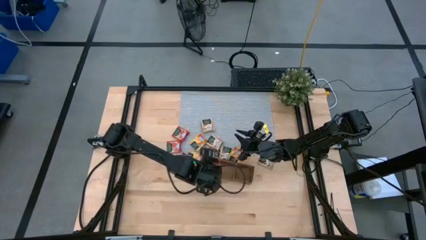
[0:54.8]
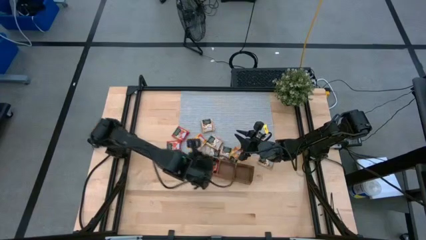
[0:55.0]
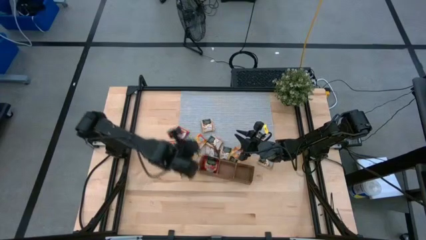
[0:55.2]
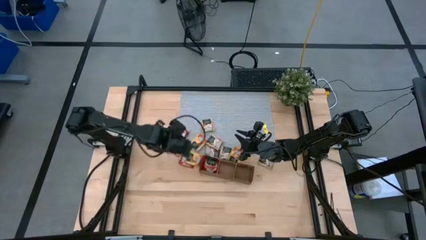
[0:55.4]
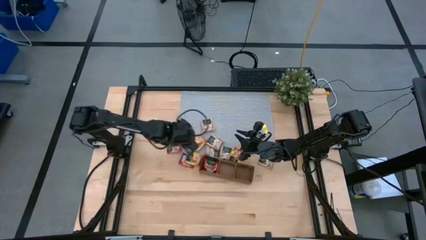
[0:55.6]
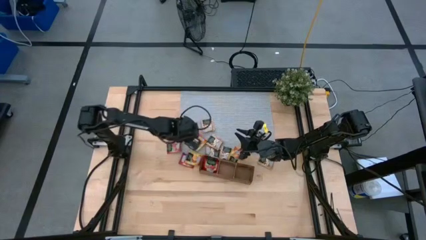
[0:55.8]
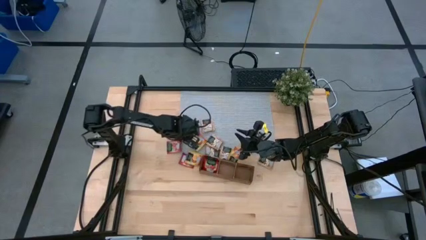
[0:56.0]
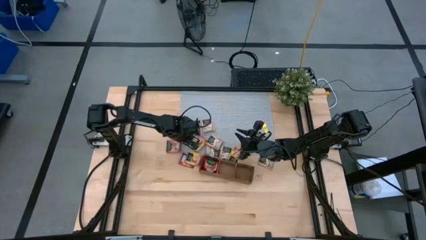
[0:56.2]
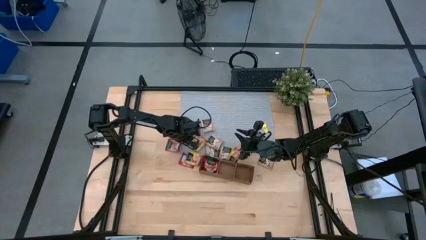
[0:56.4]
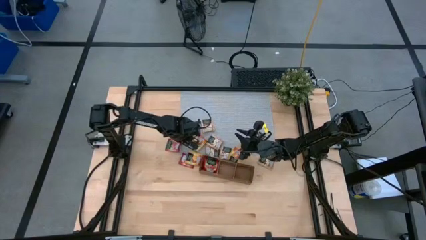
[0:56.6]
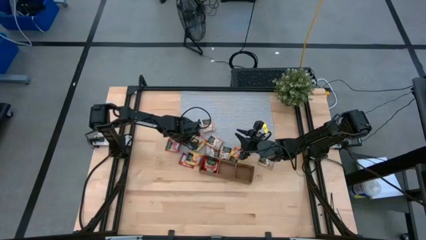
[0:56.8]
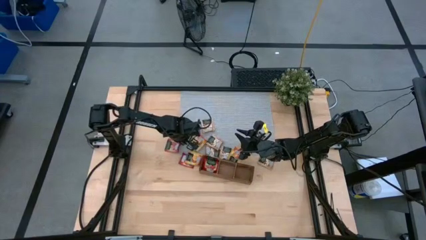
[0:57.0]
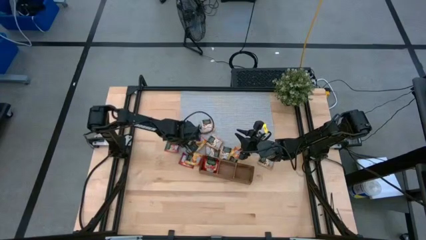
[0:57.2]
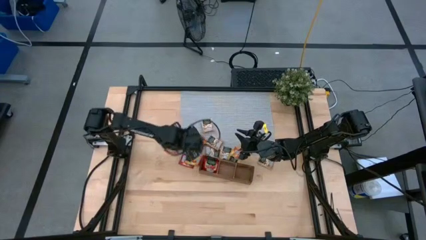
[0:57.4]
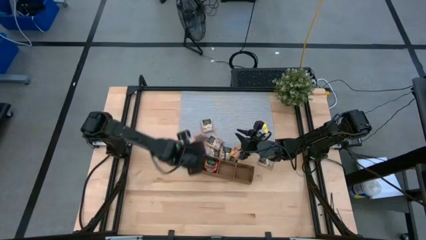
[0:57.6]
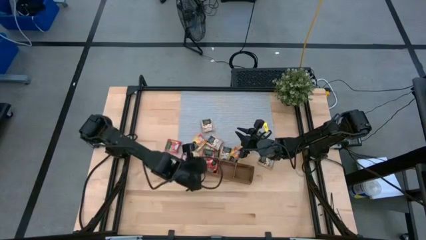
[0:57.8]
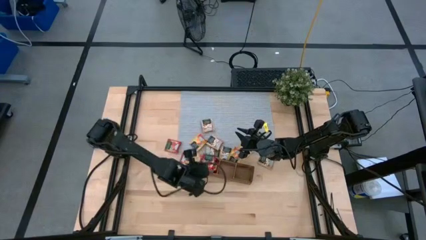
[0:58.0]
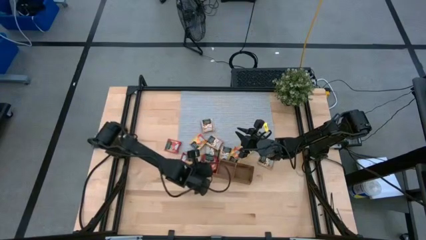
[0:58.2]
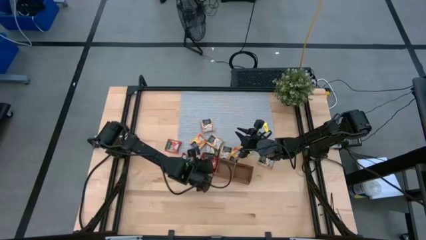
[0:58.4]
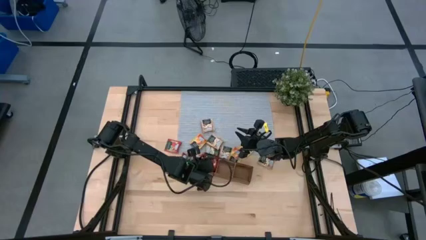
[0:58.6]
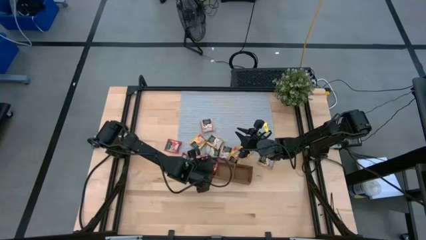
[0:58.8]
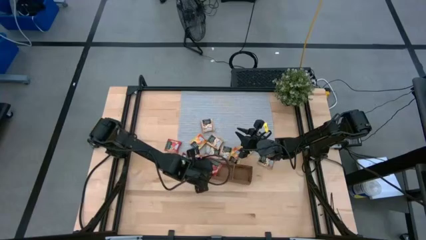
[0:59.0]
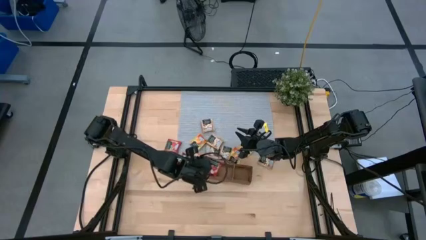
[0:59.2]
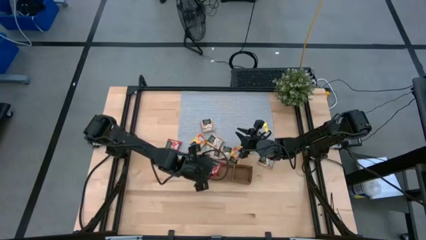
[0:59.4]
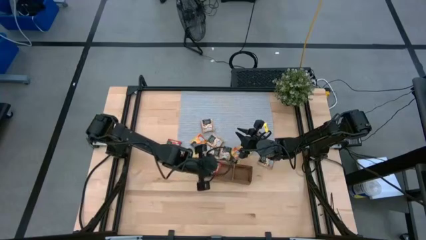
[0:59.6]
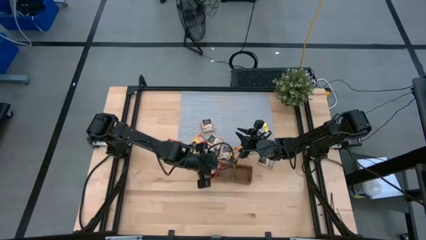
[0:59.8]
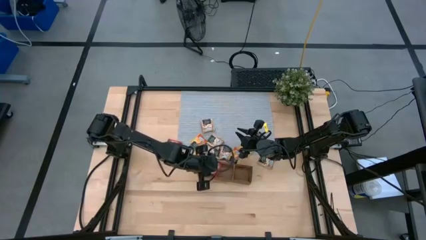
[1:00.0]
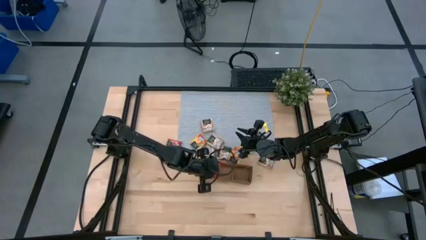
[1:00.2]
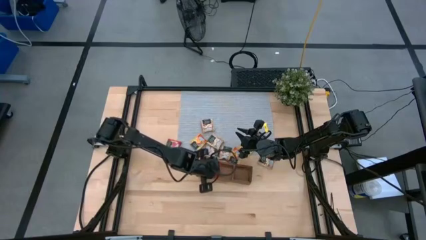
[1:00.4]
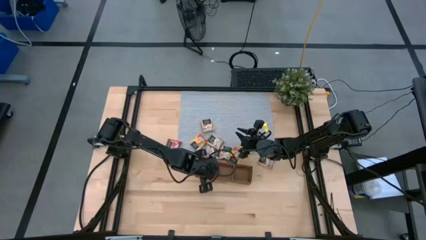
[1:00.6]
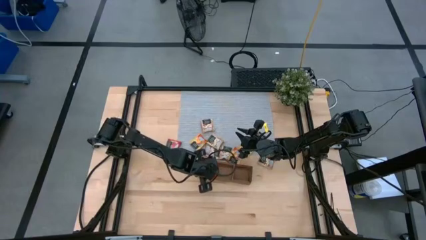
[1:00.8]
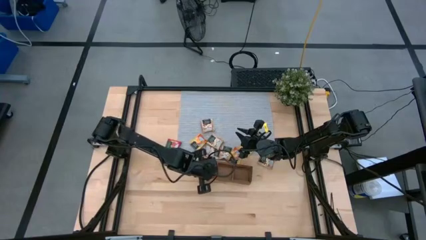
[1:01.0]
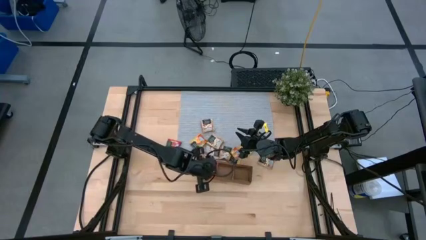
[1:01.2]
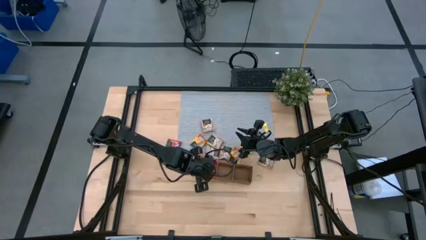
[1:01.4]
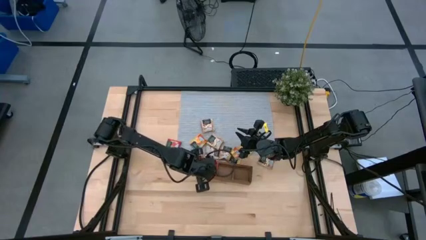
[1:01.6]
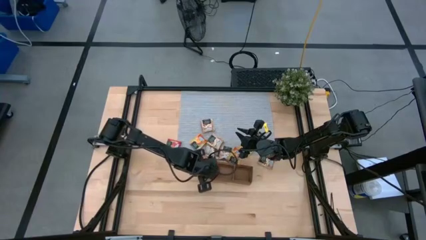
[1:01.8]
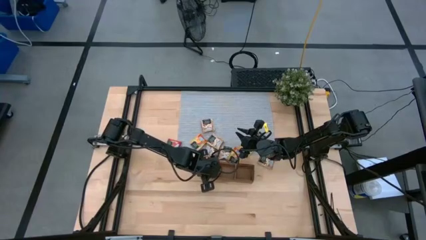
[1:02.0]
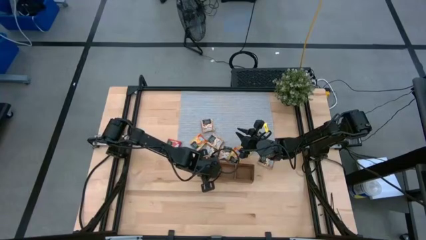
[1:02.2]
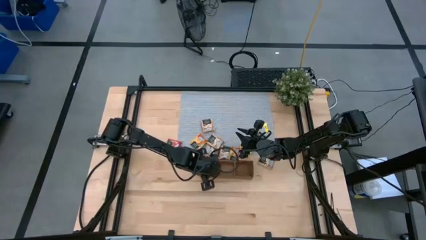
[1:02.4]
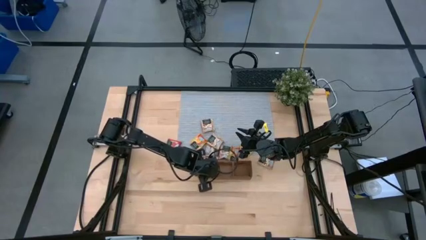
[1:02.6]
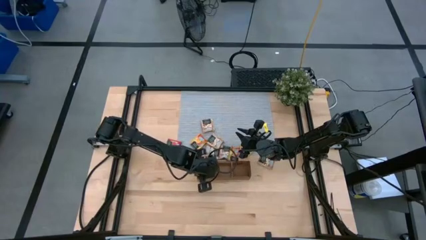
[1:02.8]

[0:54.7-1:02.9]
Task: Pick & Place Tea
Put the red tea bag into the left section of the wooden organizer

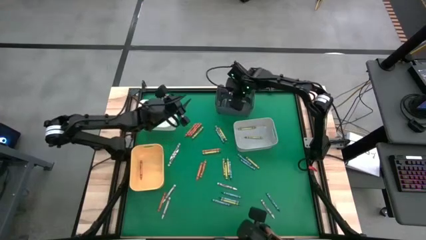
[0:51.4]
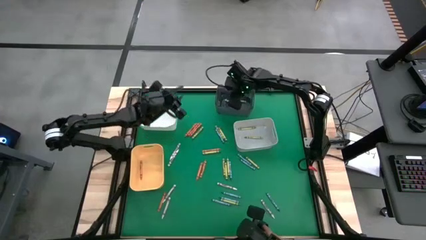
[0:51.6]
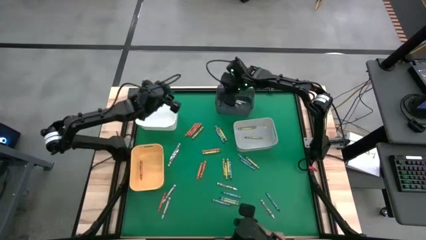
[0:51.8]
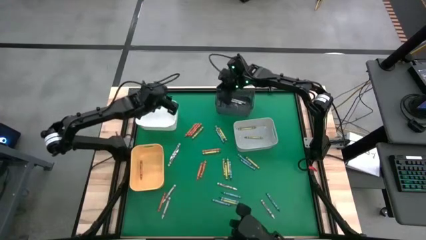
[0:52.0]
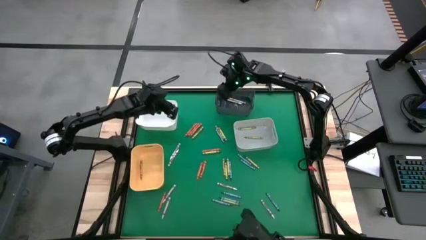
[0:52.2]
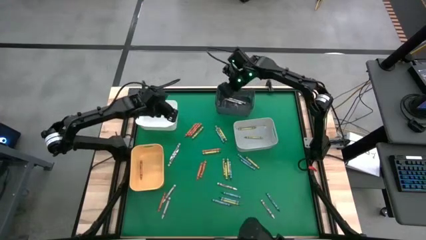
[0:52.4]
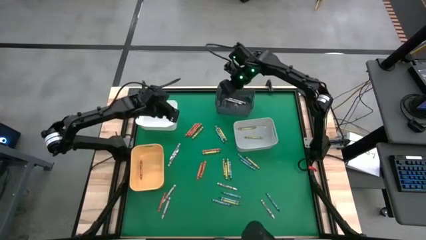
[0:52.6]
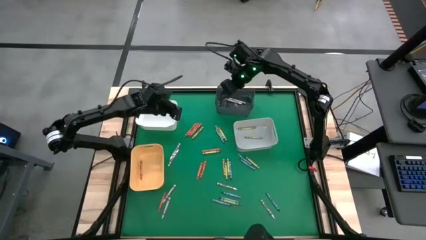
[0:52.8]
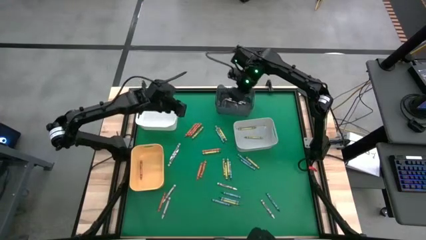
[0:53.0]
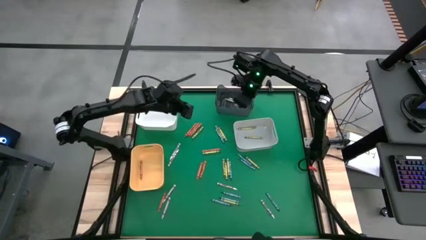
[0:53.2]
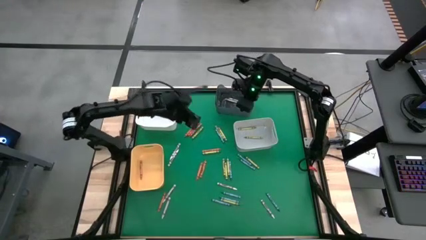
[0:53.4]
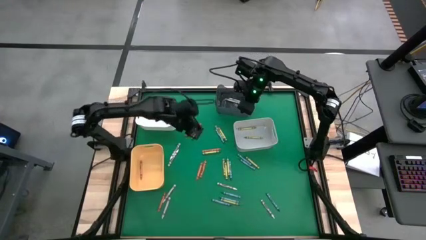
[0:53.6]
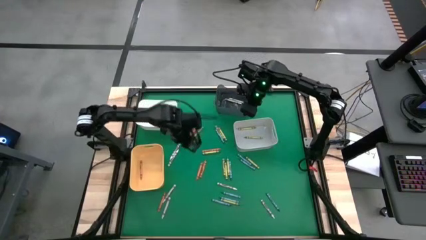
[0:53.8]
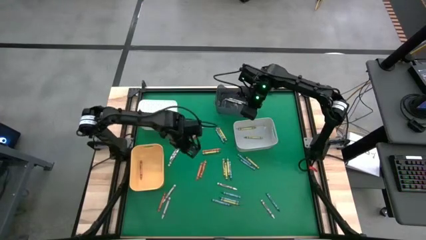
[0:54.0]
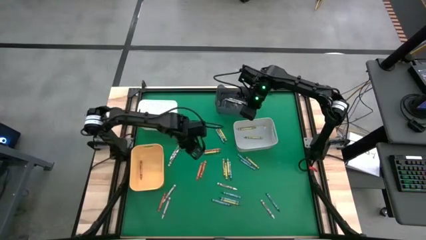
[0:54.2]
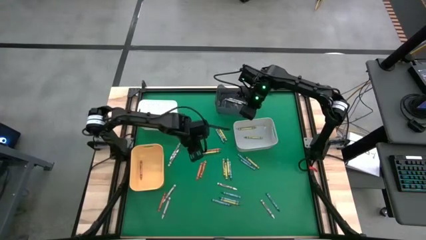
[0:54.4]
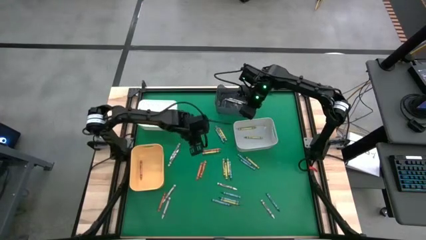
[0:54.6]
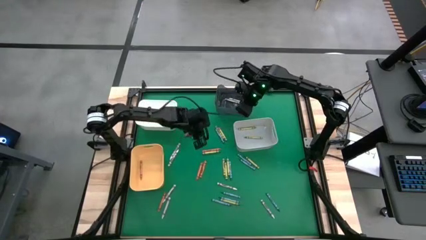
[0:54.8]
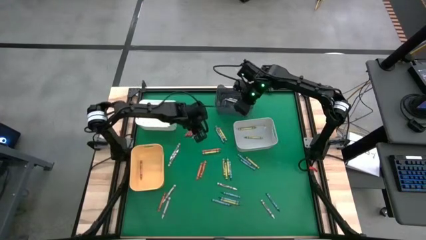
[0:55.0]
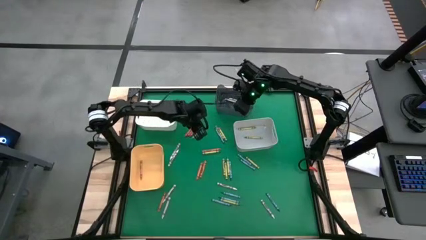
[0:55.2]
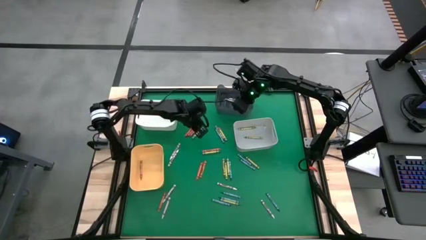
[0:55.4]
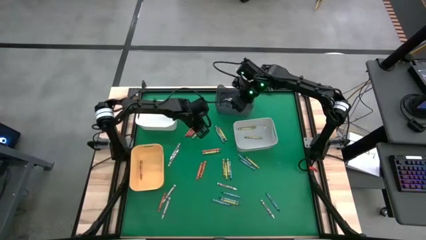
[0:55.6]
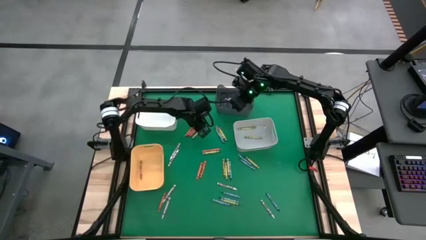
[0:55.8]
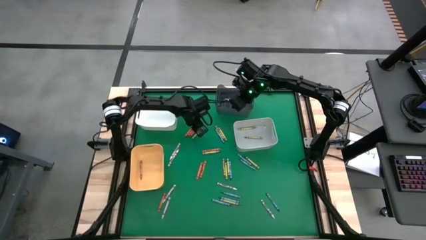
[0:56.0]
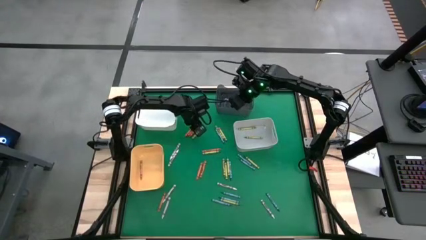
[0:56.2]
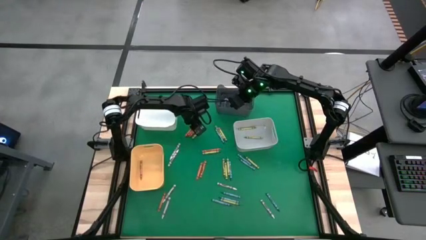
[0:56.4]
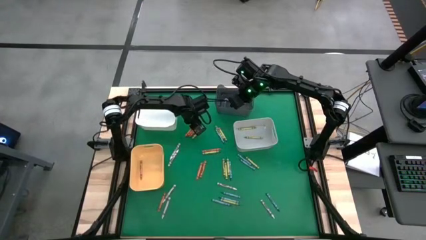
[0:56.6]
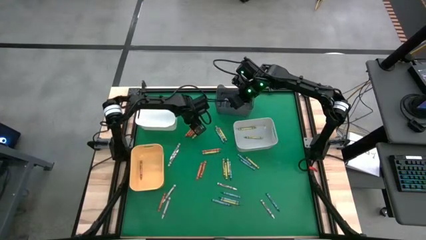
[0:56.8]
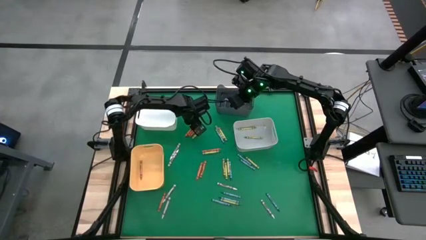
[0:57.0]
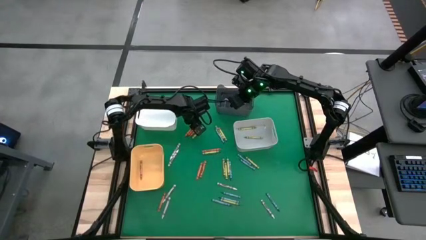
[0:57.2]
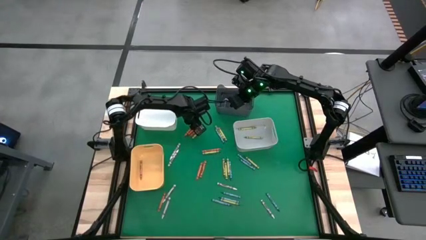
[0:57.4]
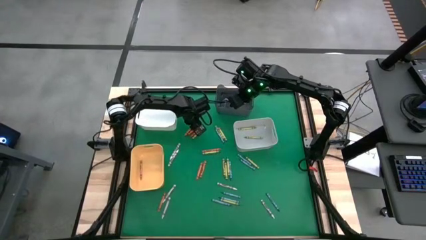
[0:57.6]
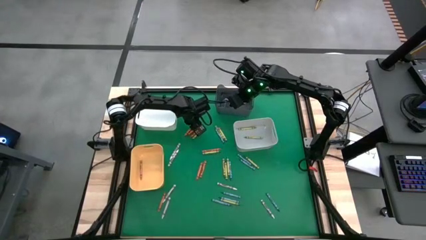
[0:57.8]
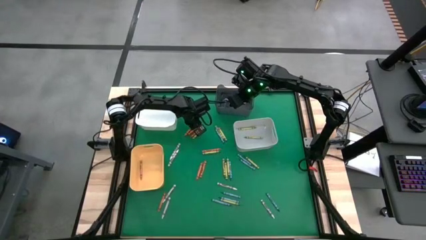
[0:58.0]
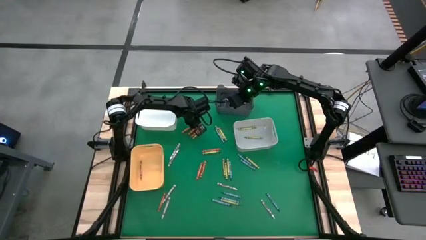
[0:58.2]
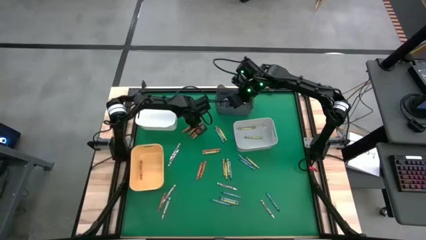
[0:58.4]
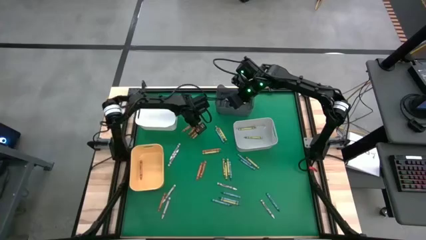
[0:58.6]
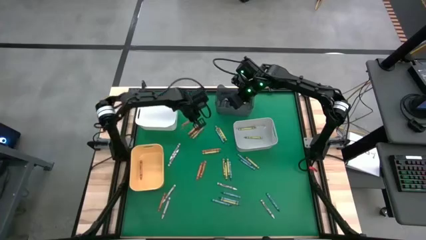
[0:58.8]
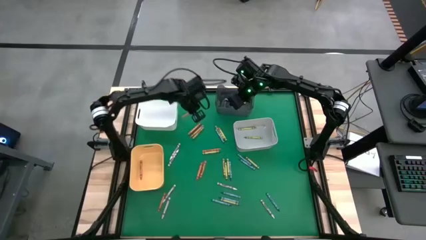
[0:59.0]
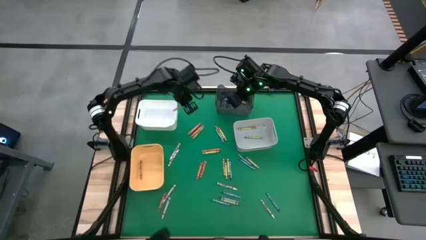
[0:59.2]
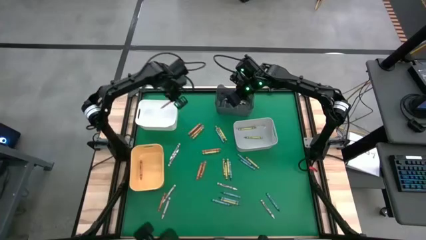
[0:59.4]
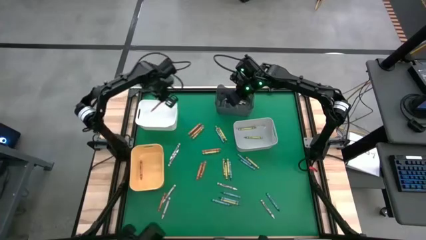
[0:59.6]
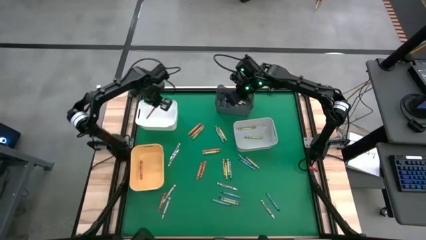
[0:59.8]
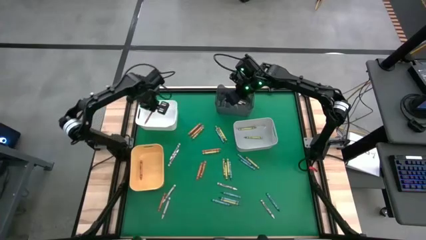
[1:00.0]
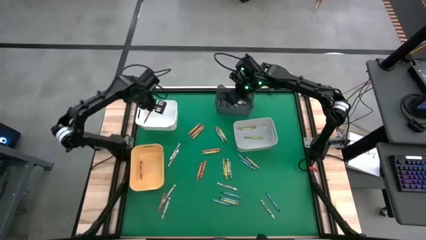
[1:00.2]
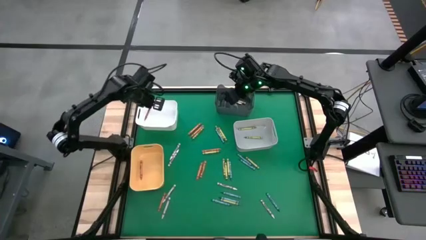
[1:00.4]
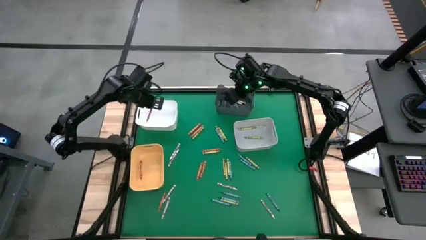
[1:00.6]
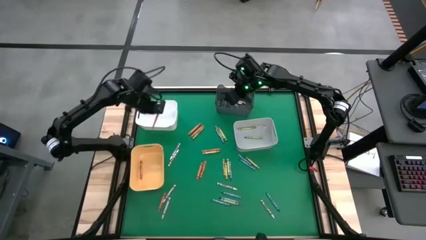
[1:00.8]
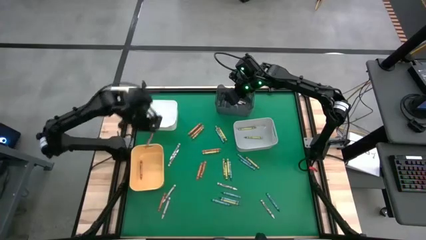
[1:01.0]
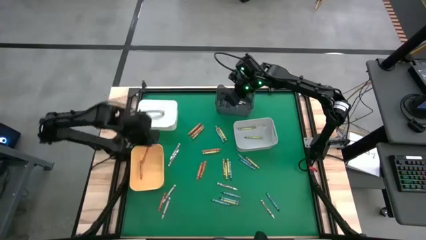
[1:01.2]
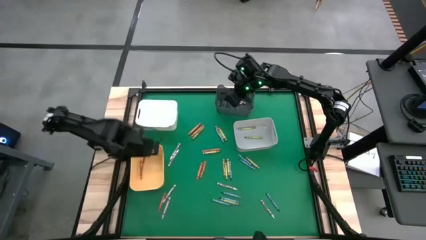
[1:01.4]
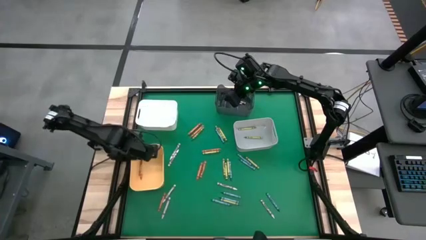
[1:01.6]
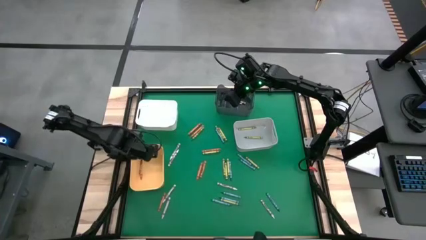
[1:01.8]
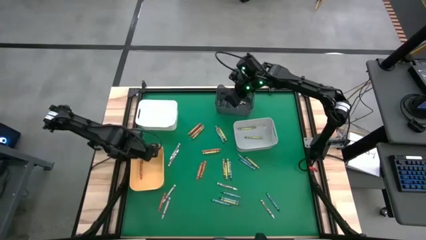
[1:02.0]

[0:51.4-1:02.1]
Task: Sort crayons
Put the orange crayon into the orange bin
